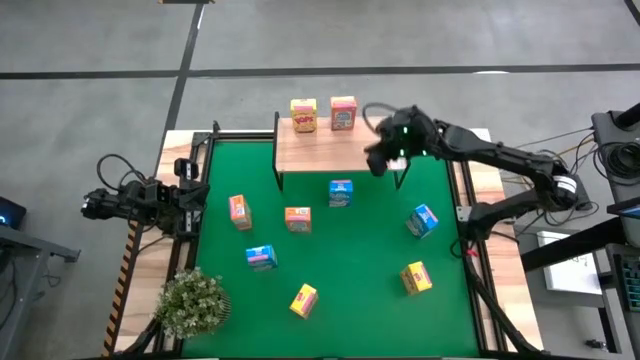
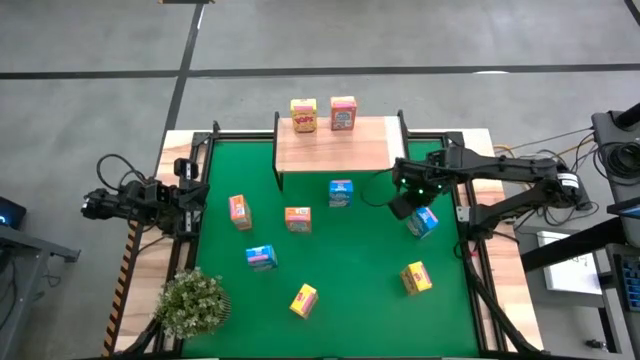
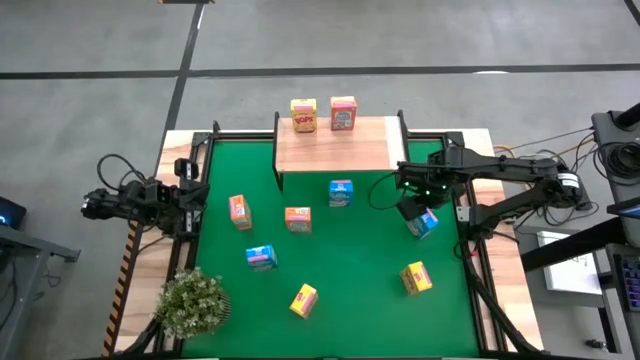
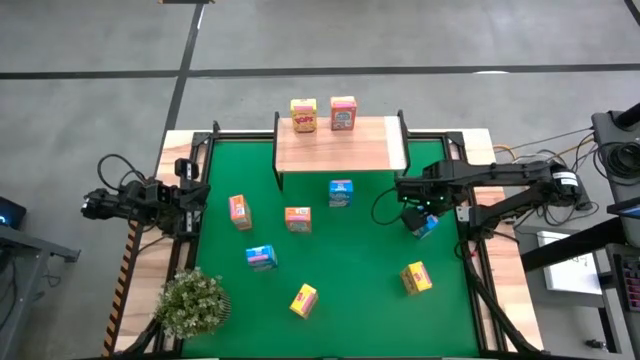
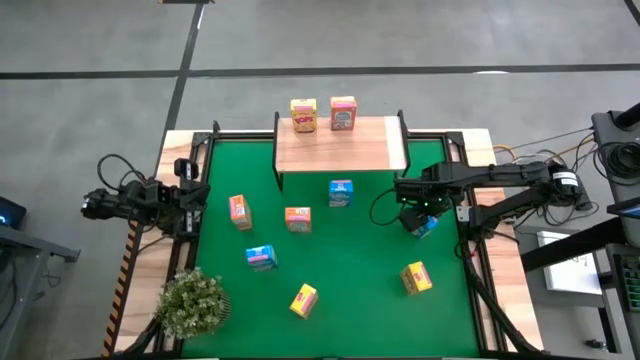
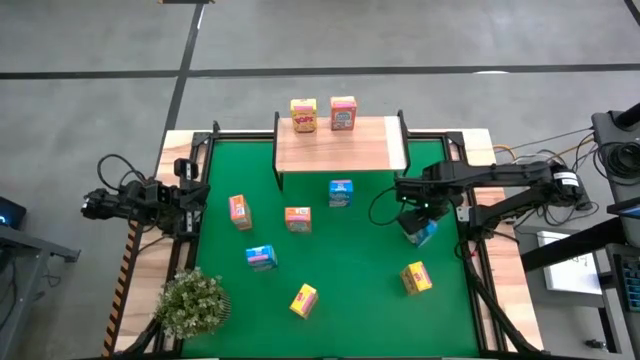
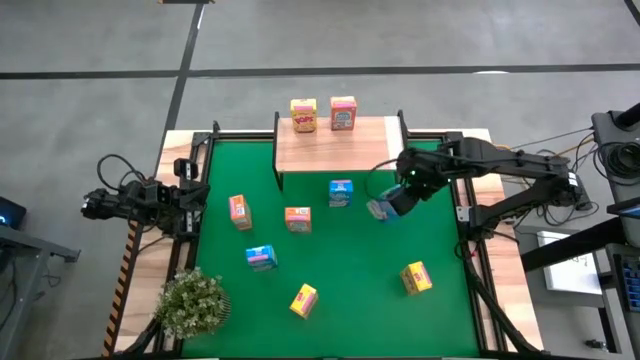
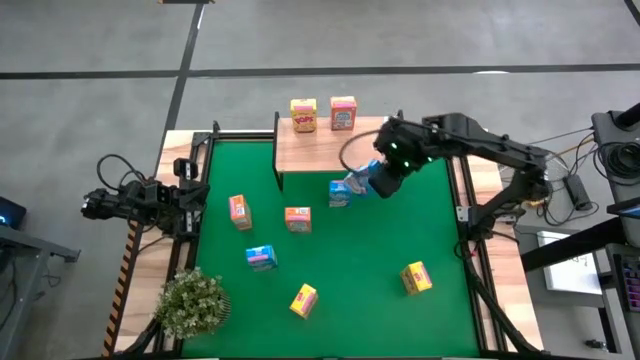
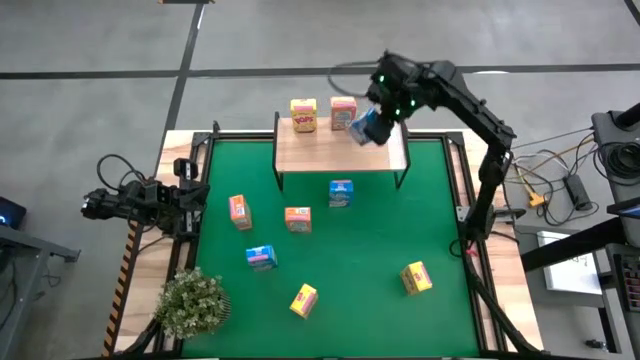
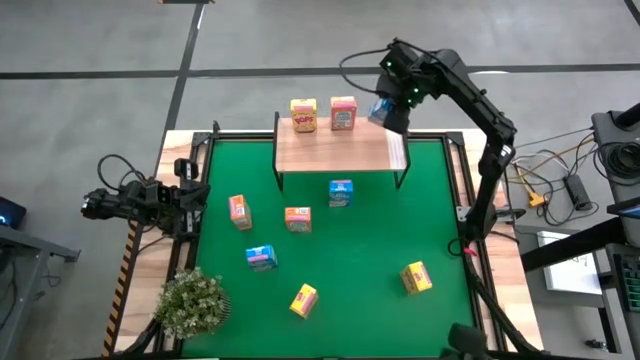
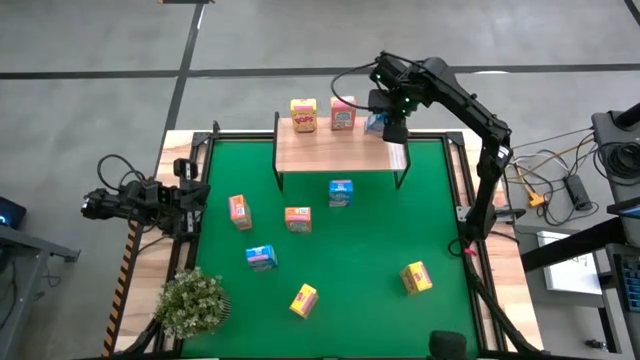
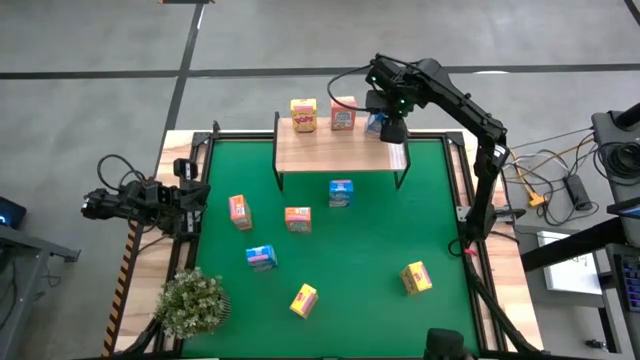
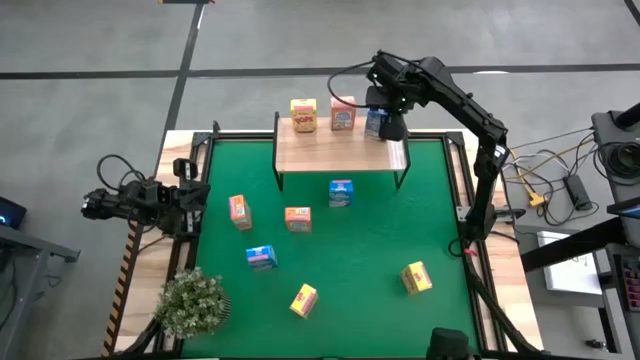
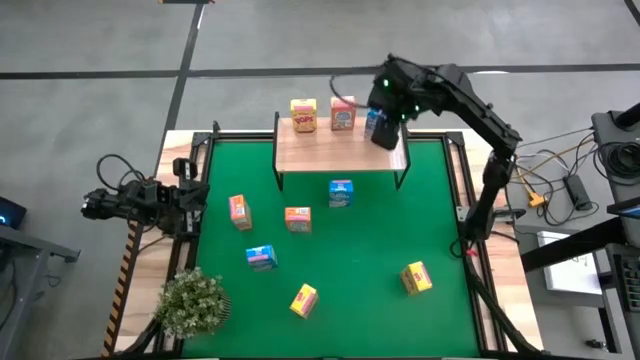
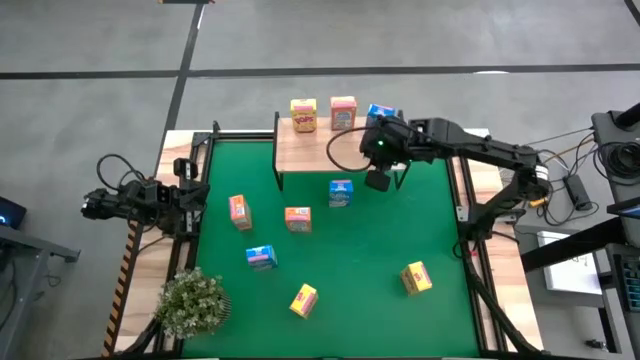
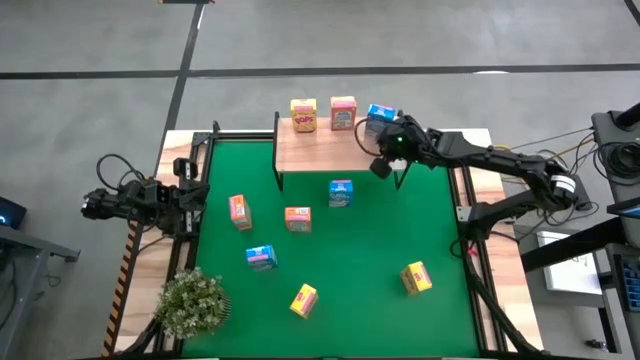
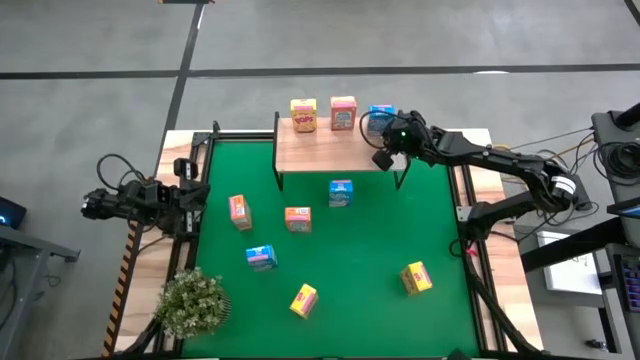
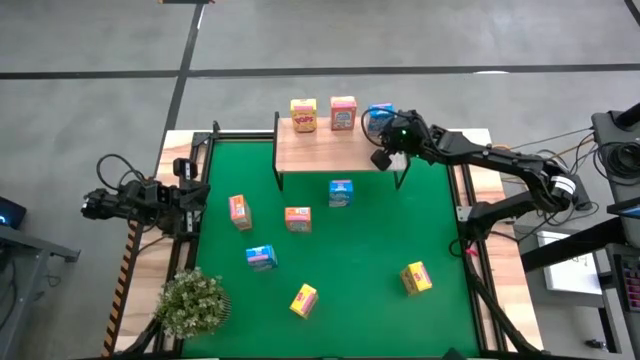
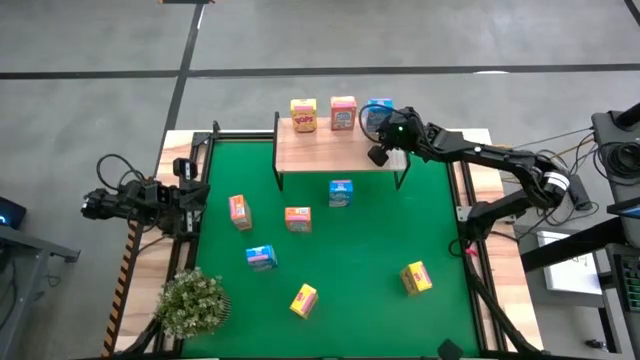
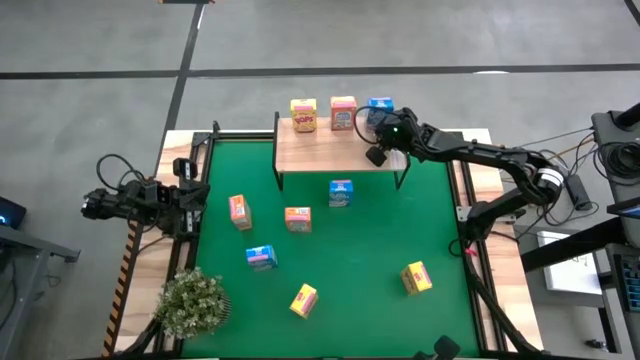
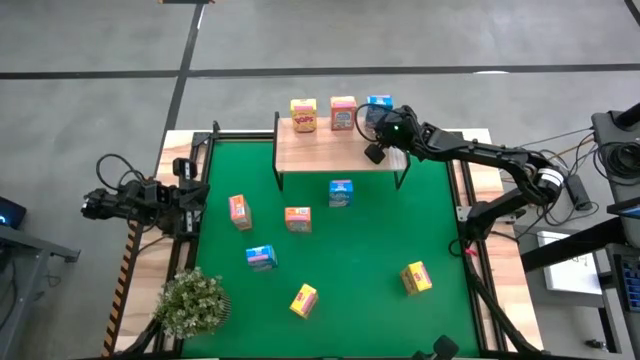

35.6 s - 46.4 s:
Task: Stack cereal on shelf
Put the right blue cereal box on the shelf

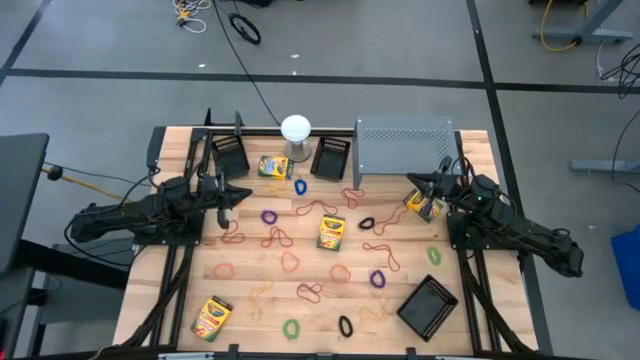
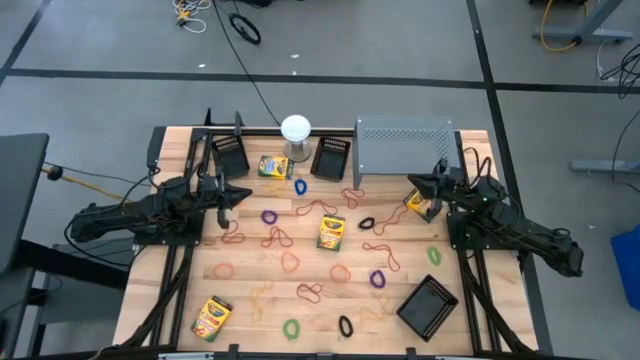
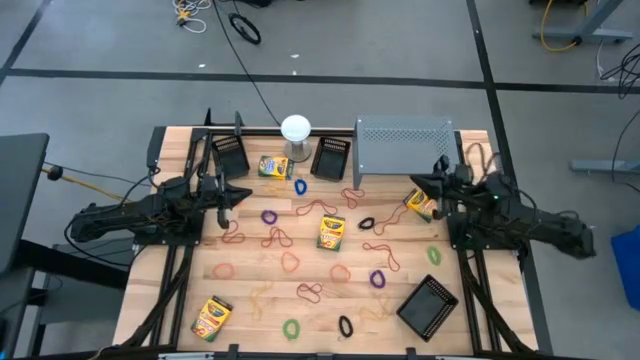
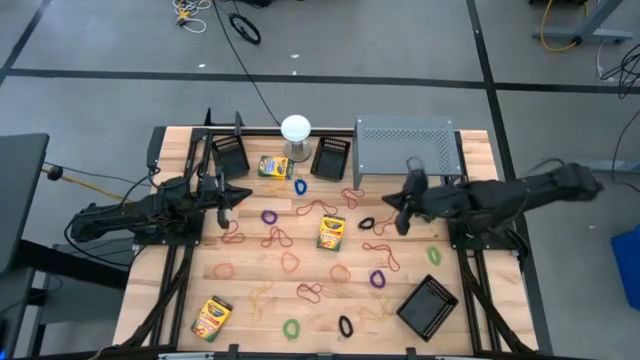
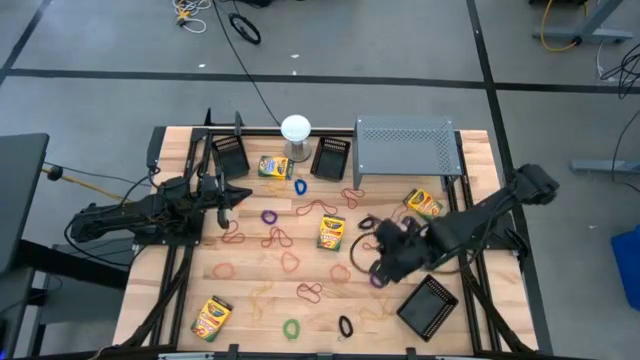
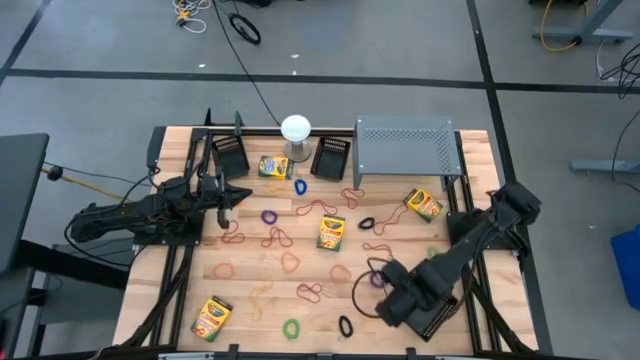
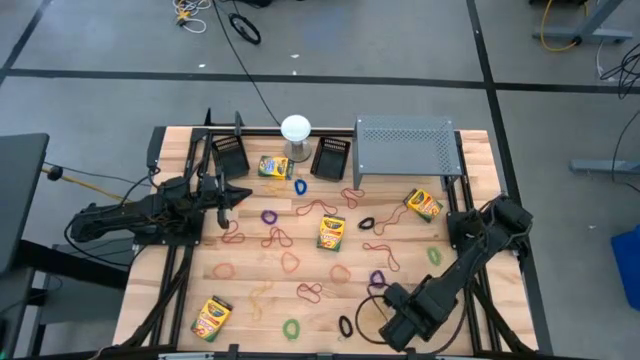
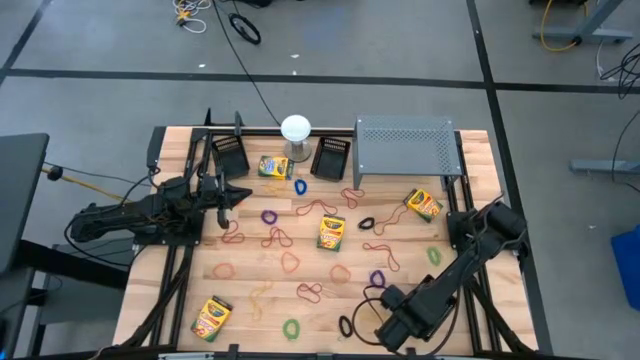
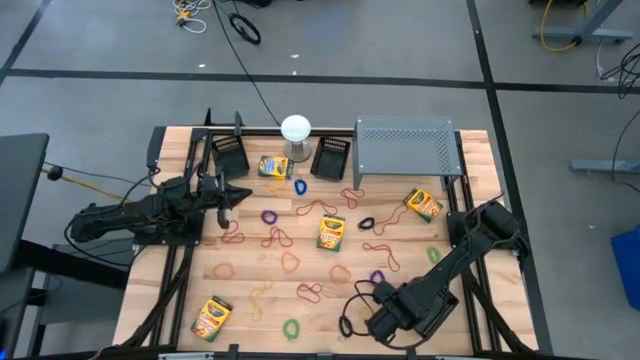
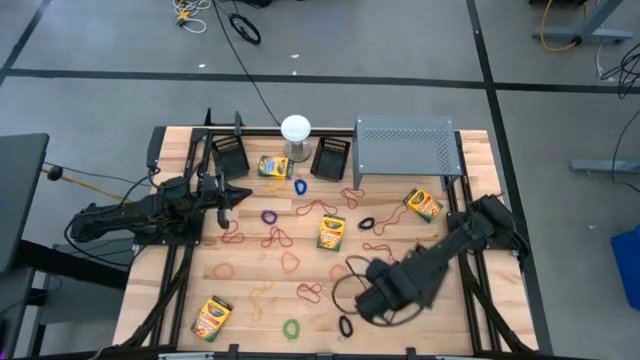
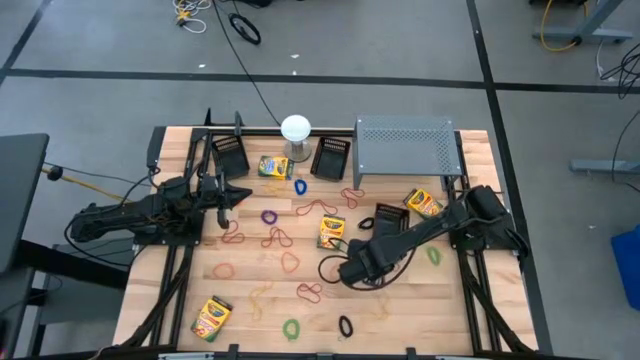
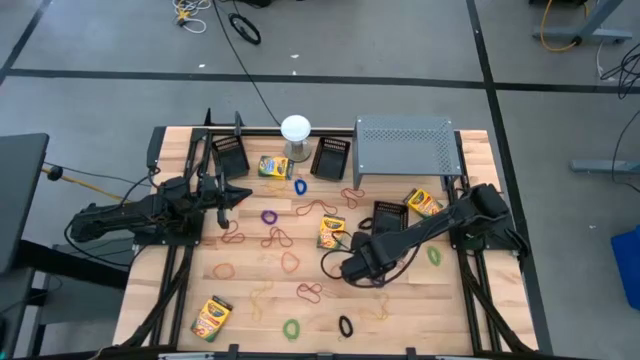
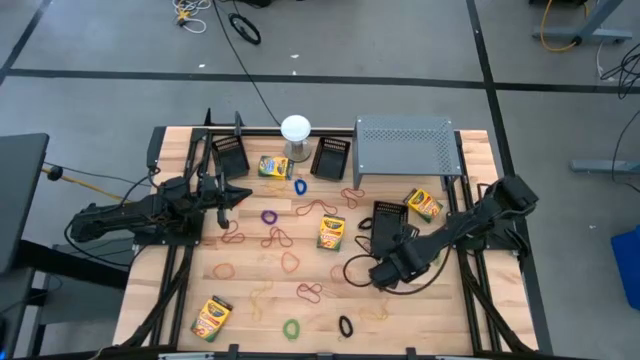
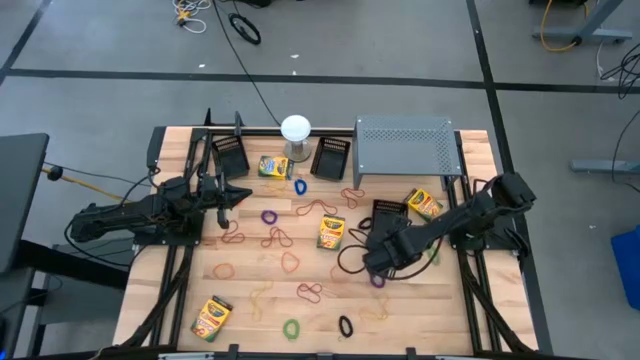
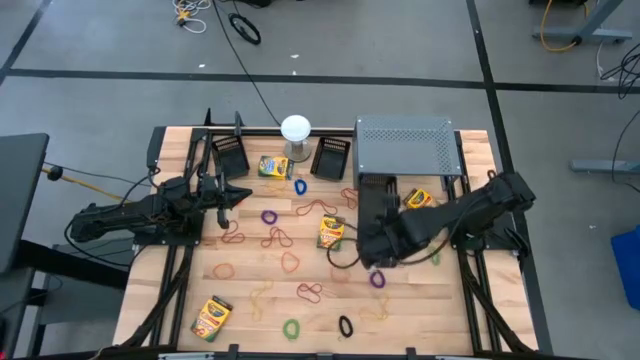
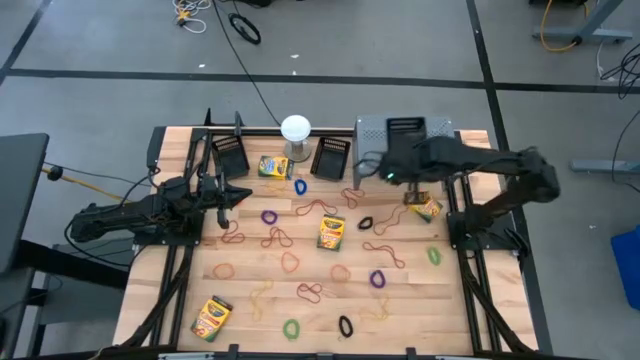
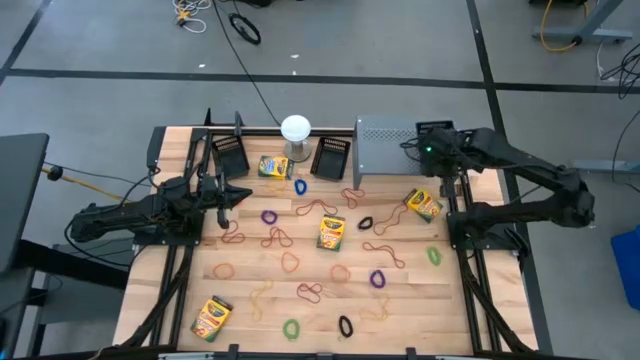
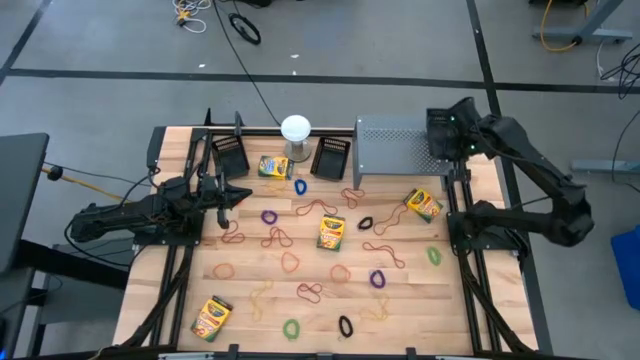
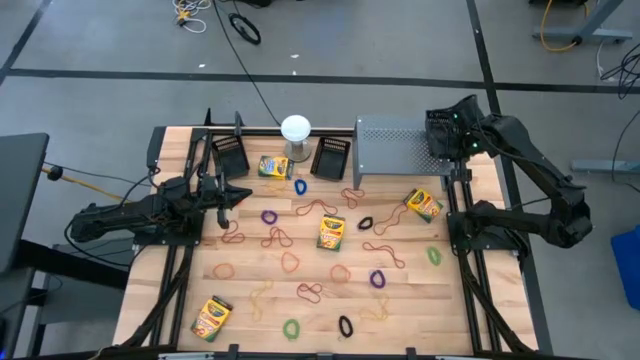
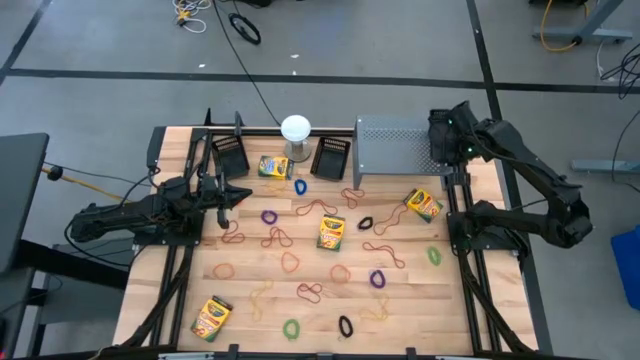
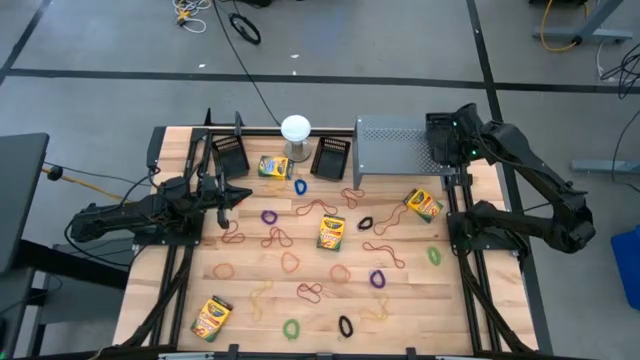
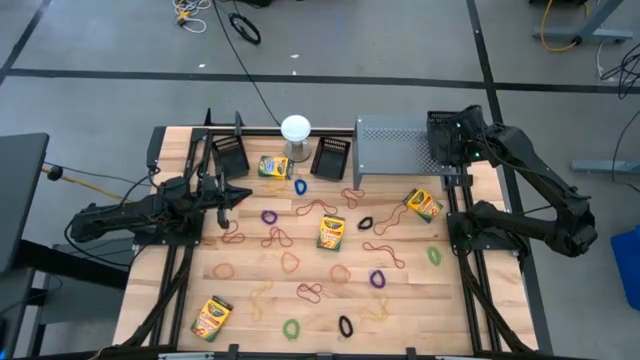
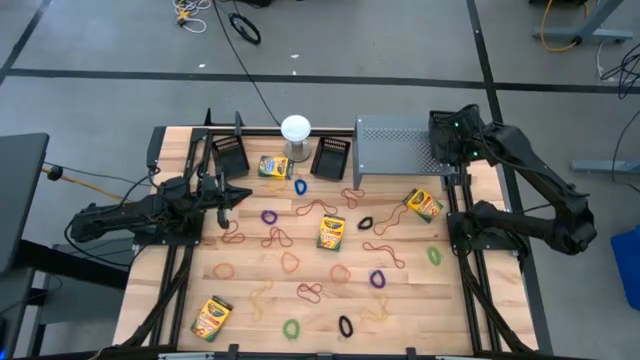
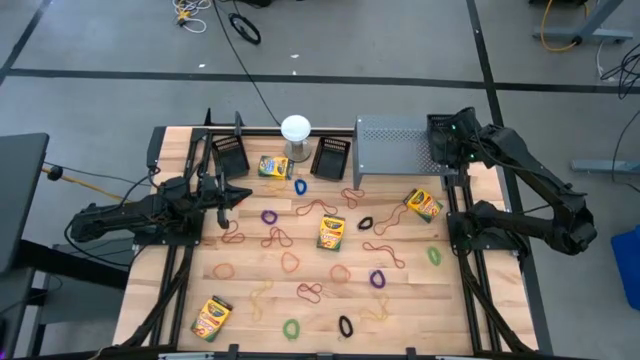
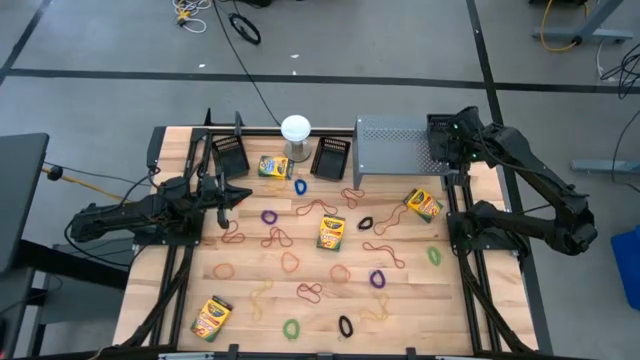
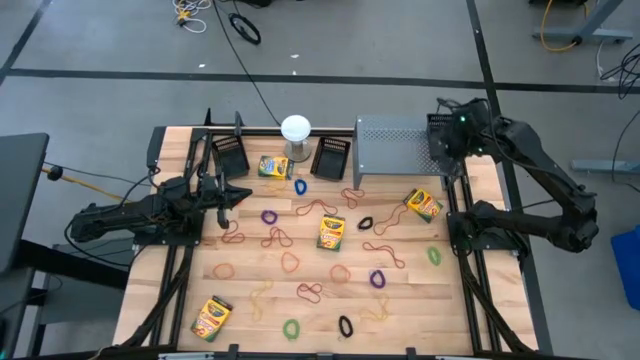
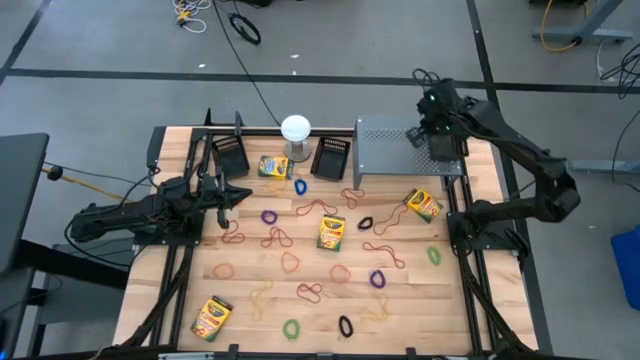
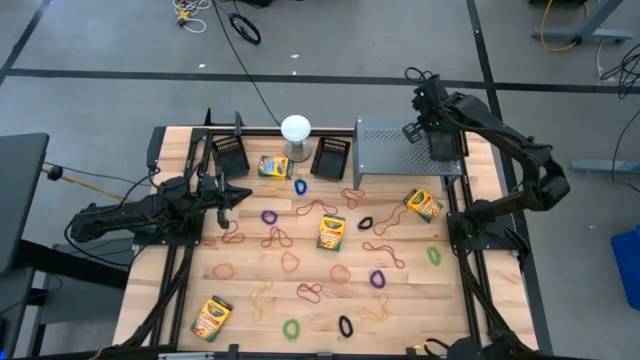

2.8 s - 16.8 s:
Task: Pick & Place Office Desk Supplies
Put the black basket on the shelf
